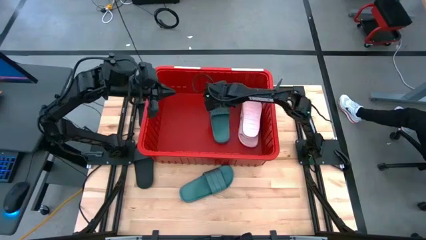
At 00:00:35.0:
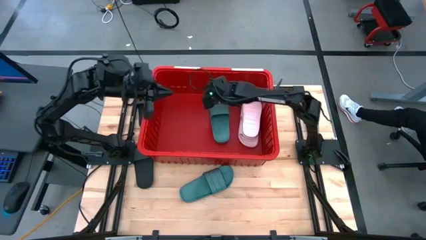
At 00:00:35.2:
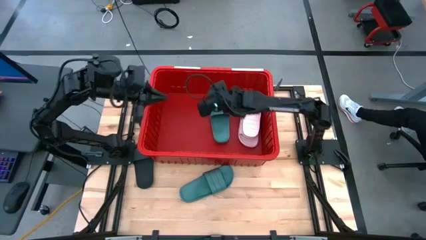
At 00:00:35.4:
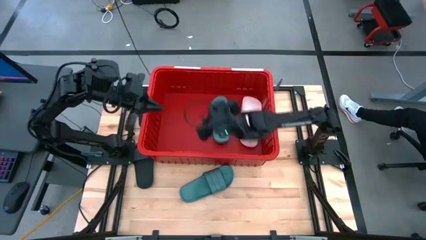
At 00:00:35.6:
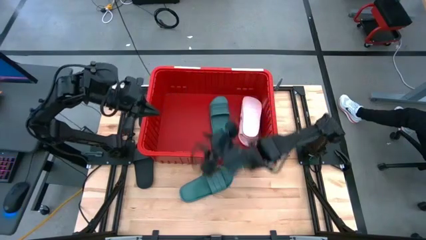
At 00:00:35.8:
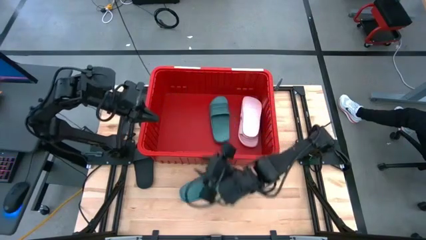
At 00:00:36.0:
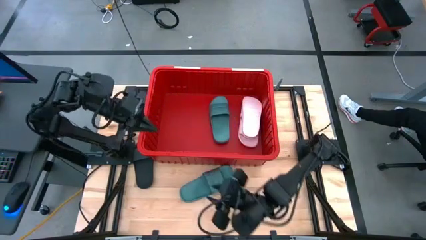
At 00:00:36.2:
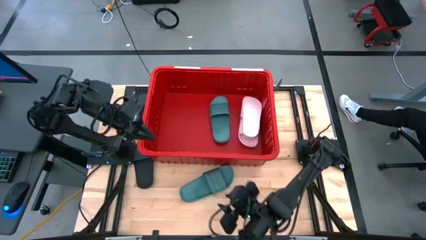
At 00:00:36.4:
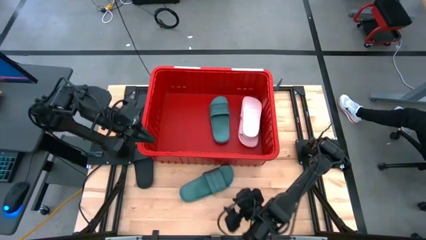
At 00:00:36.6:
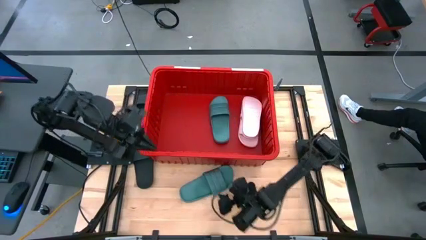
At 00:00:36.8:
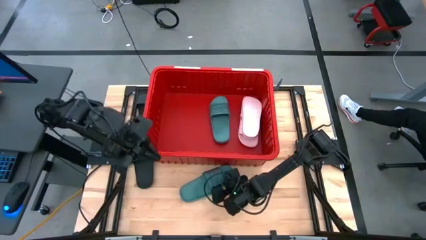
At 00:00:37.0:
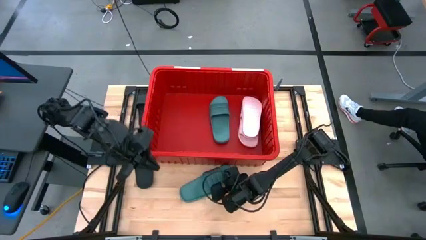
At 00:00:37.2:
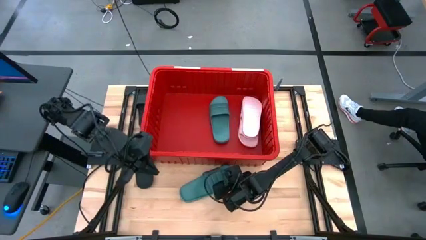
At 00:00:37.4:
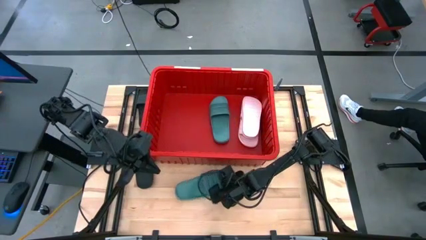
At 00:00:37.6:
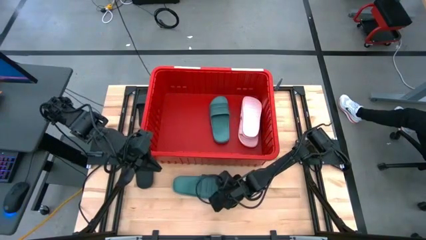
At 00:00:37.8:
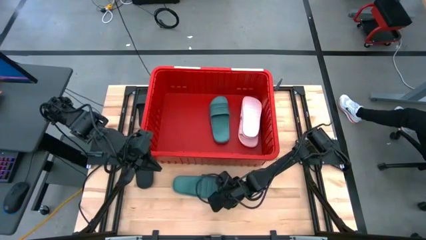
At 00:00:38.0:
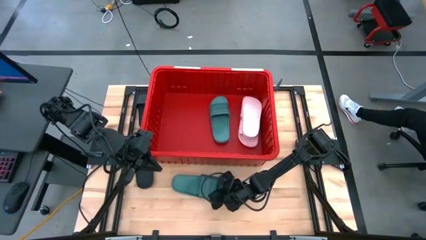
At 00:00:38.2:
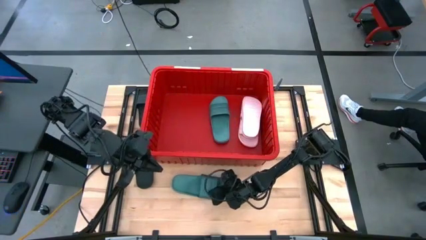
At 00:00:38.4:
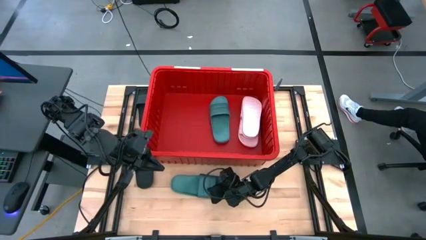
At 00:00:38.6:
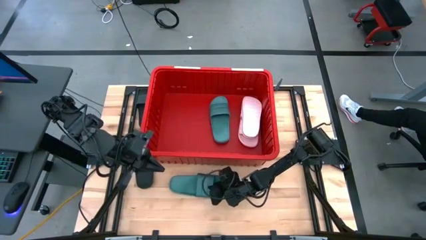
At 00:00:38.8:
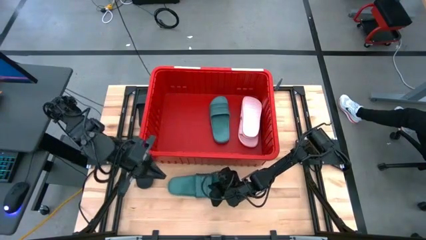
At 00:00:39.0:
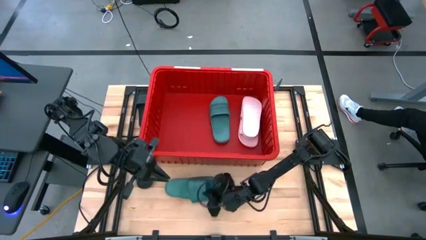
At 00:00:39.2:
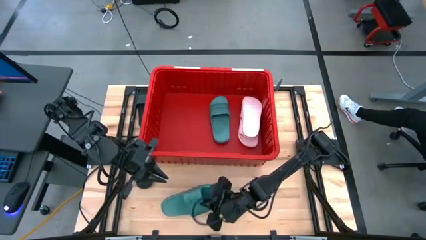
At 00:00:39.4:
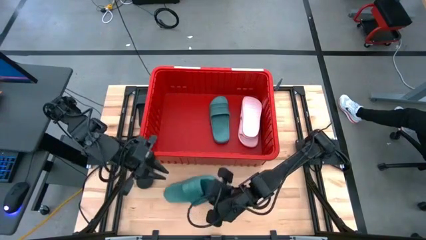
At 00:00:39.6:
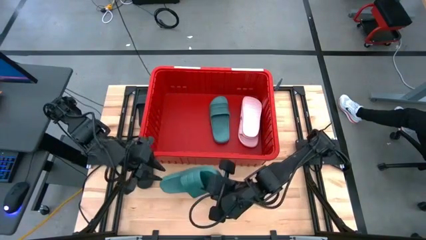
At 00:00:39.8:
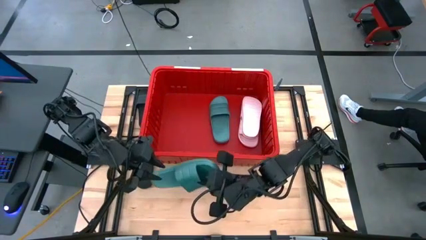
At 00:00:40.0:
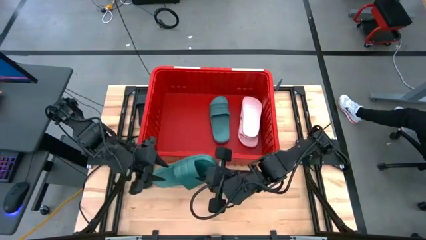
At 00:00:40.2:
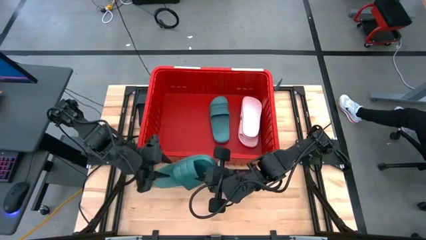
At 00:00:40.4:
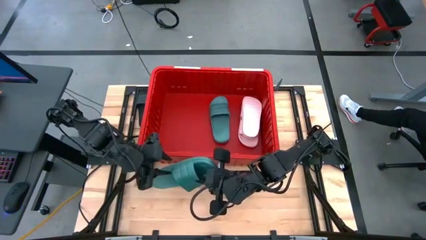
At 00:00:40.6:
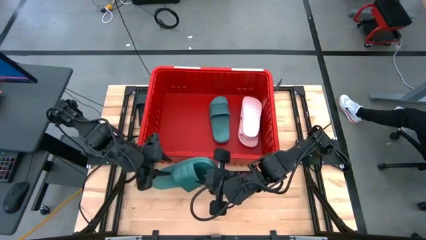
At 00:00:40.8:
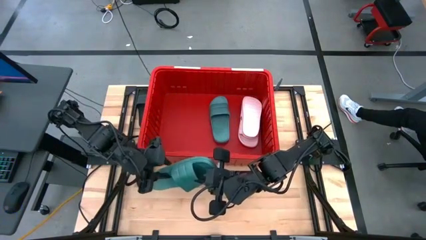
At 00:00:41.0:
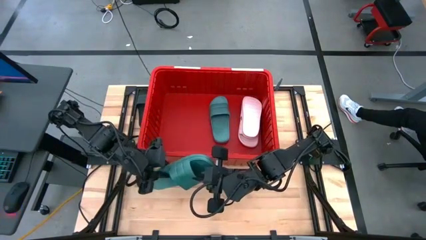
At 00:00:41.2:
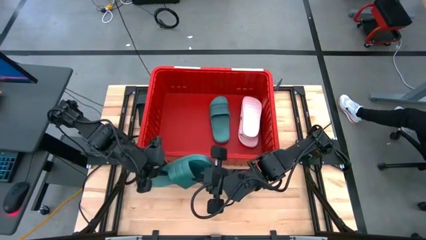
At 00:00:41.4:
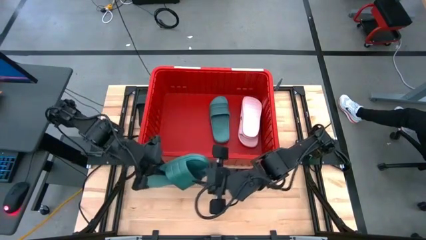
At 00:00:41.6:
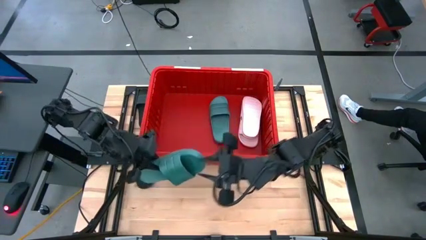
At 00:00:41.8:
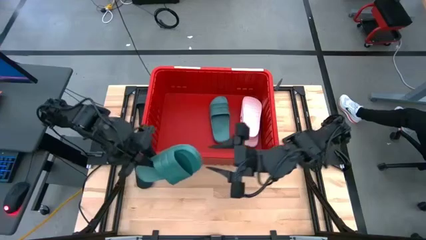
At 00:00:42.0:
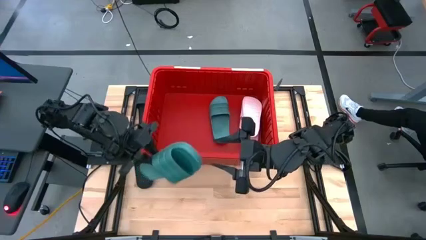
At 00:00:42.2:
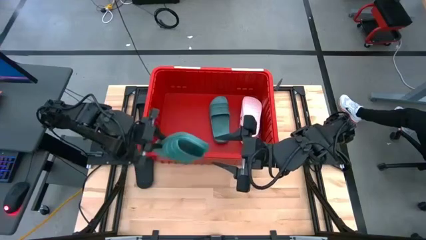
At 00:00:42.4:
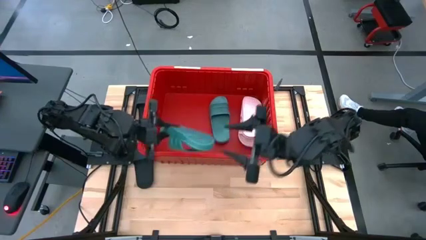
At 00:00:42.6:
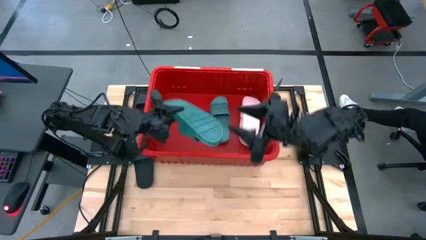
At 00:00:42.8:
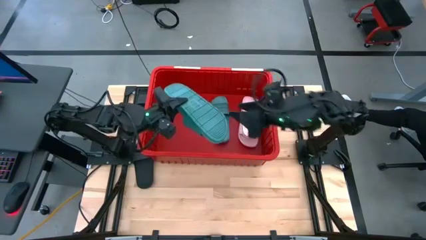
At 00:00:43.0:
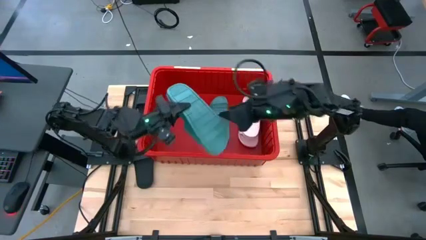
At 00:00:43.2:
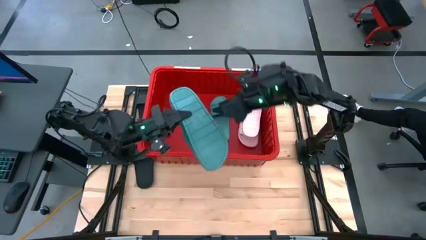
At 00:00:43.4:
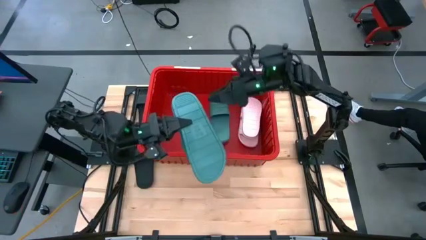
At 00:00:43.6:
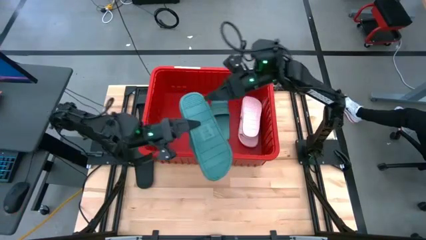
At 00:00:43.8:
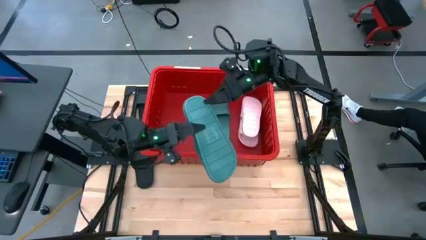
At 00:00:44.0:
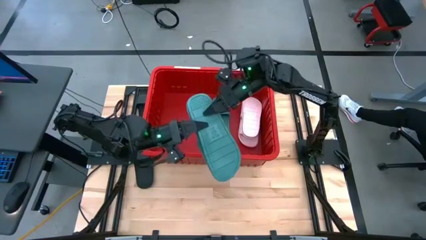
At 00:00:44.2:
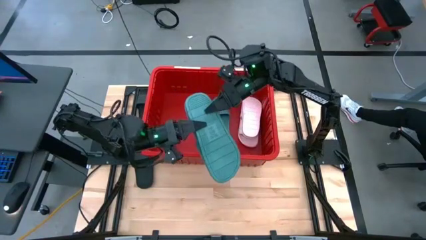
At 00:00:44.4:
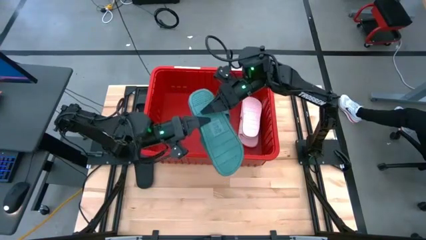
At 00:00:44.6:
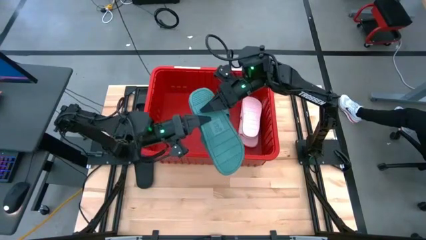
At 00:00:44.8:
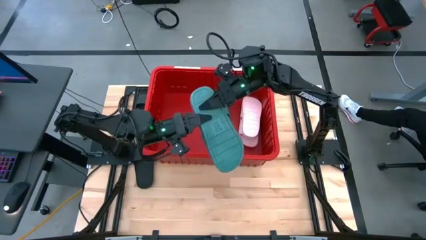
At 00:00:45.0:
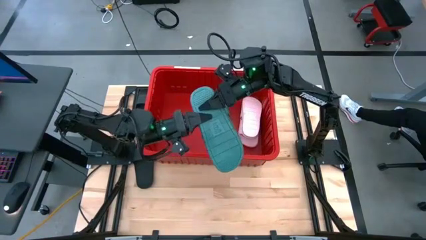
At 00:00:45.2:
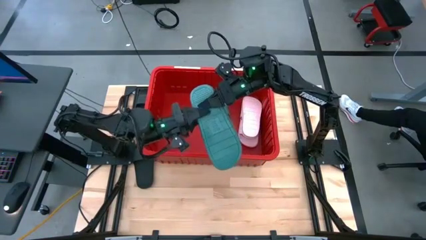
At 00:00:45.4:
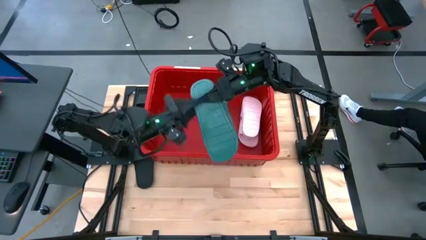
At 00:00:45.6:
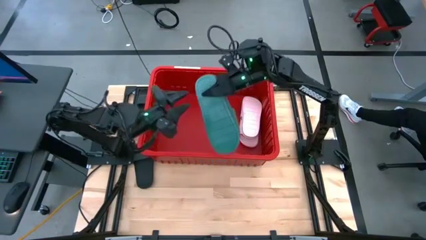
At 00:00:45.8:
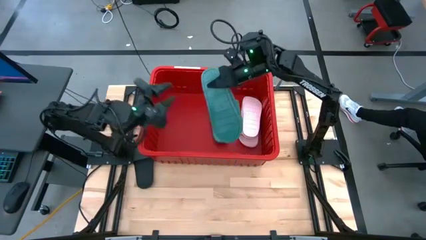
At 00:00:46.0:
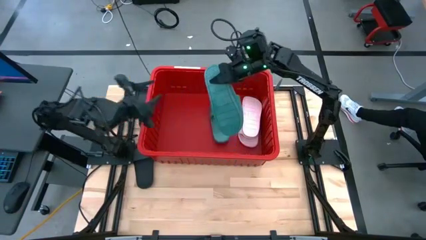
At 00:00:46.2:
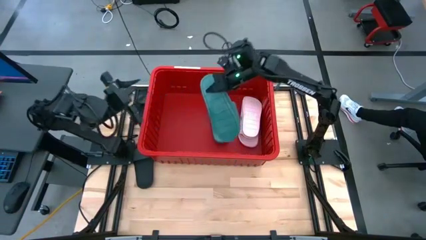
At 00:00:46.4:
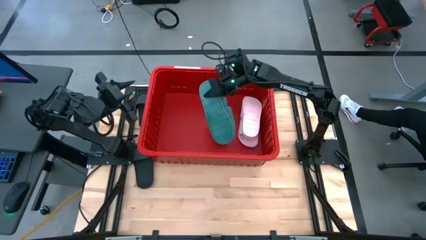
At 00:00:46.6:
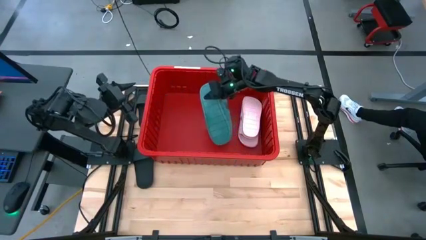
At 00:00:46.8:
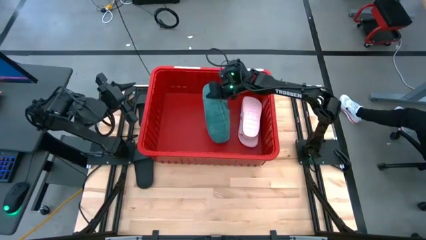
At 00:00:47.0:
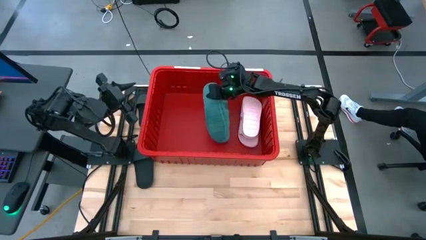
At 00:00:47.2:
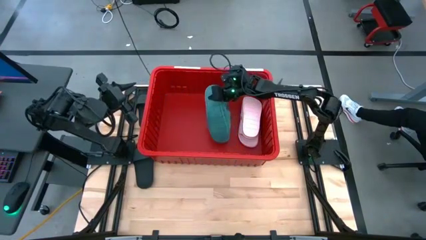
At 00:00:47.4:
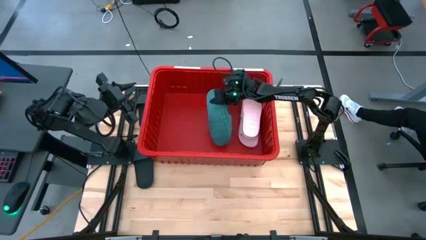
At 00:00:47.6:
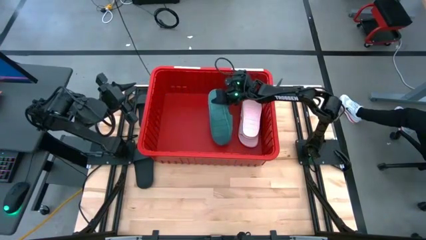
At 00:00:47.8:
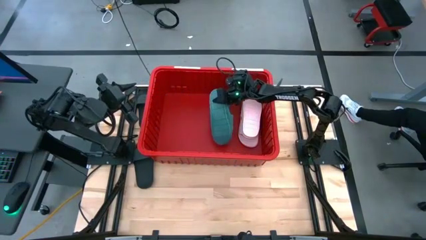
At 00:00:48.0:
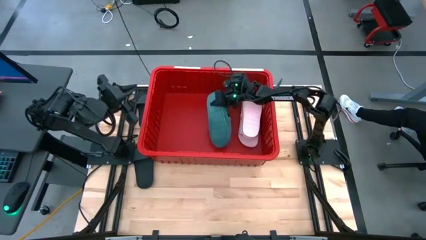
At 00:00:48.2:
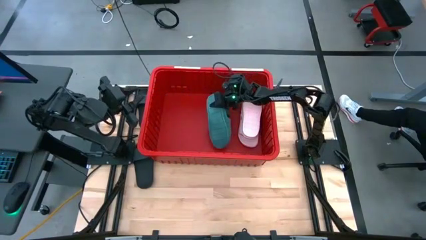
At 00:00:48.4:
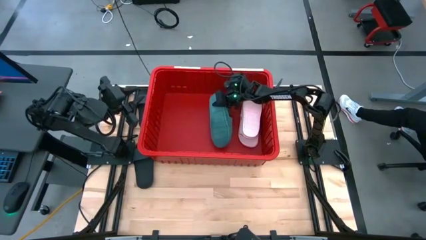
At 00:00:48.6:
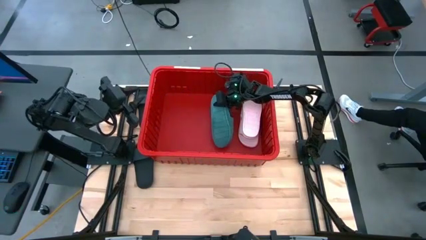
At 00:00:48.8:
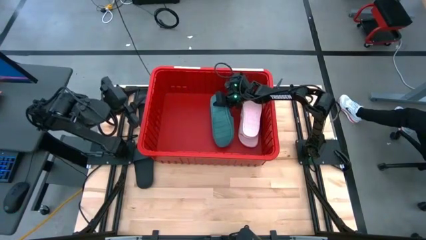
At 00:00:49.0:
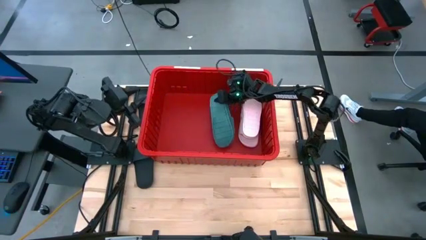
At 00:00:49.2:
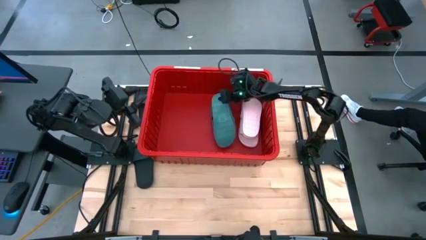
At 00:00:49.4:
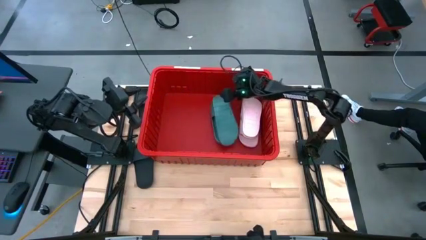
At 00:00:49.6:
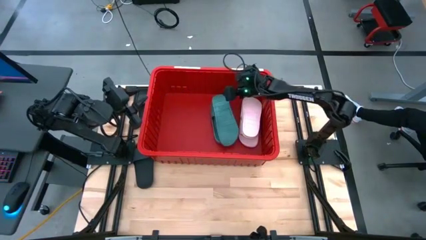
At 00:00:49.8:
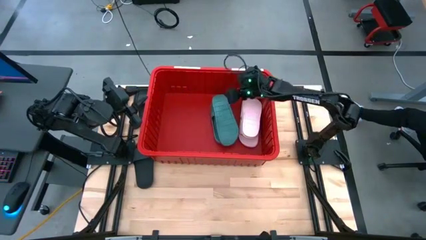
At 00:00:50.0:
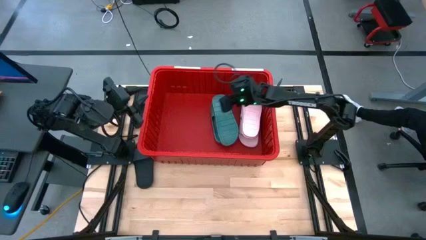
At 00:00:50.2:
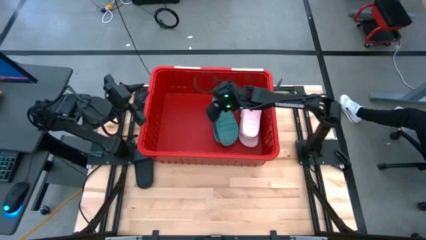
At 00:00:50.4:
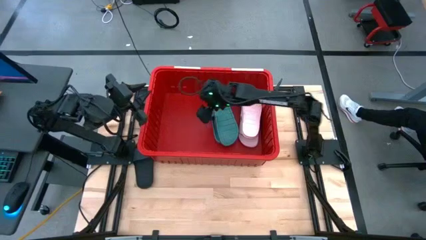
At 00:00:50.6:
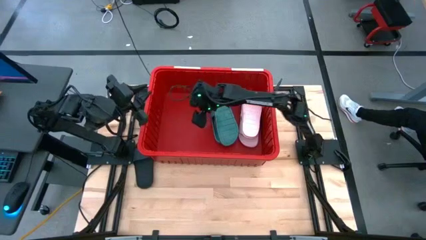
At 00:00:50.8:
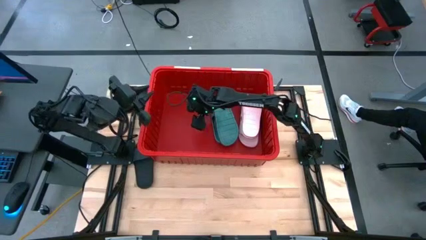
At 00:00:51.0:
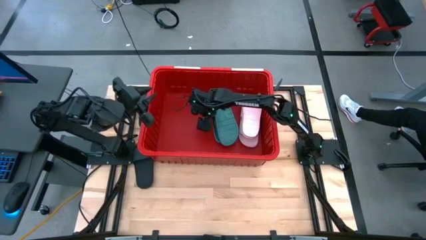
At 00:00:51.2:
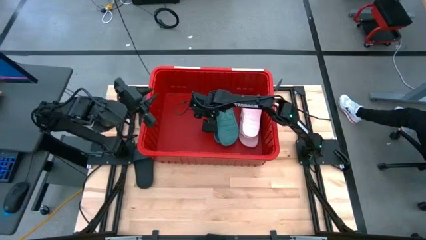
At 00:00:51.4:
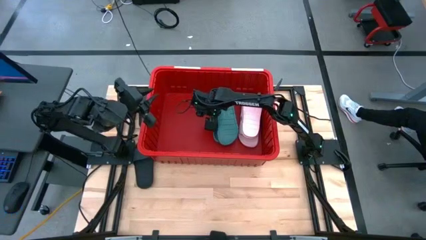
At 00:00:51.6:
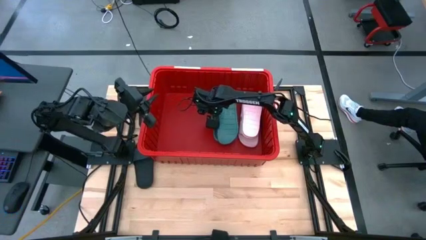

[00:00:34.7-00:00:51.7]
Task: Pick and place slides into bin
Put the green slide in the red bin
